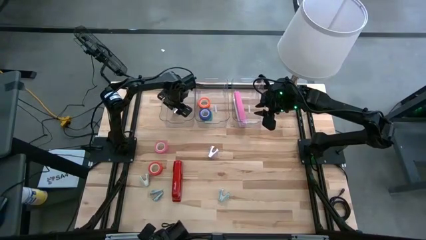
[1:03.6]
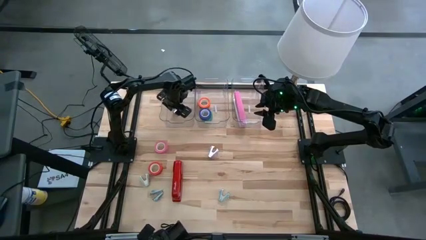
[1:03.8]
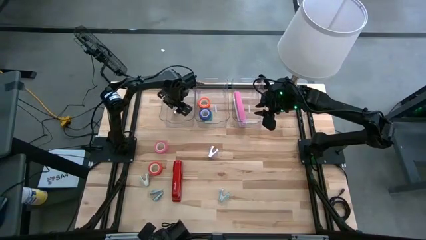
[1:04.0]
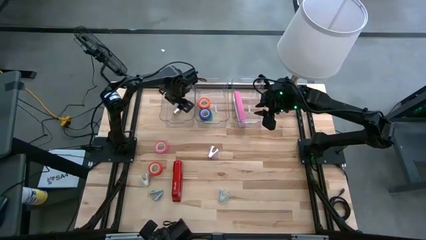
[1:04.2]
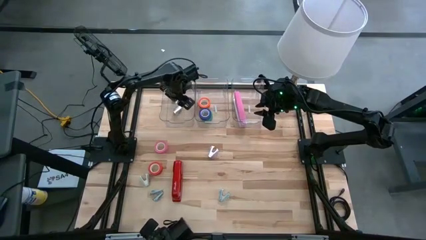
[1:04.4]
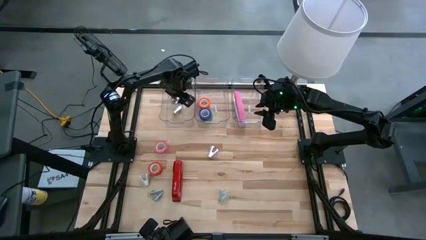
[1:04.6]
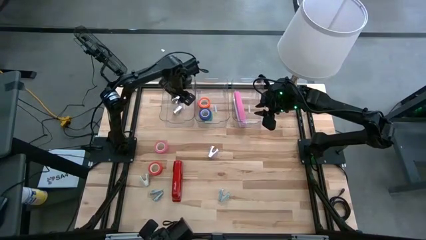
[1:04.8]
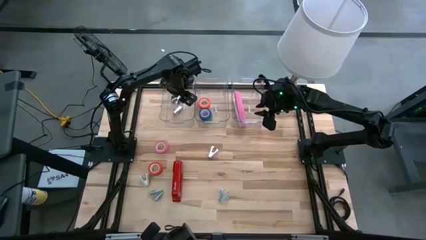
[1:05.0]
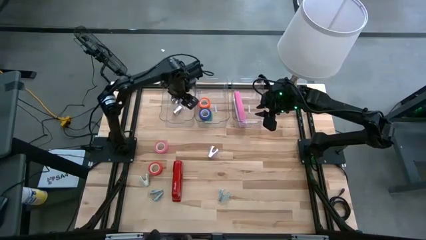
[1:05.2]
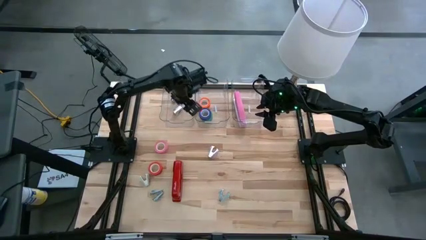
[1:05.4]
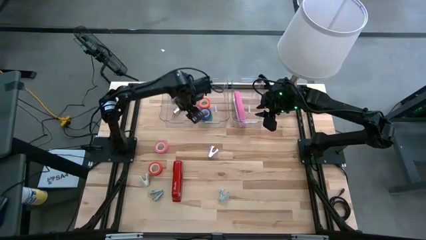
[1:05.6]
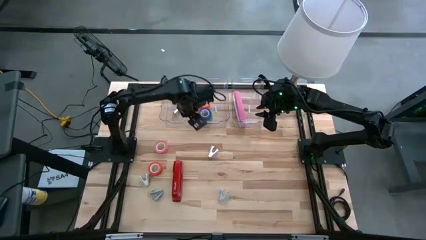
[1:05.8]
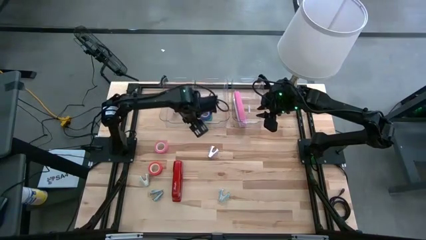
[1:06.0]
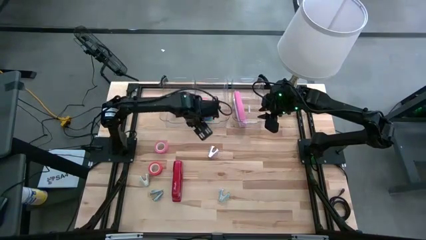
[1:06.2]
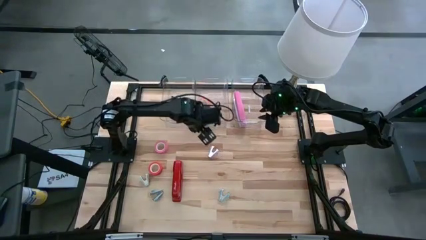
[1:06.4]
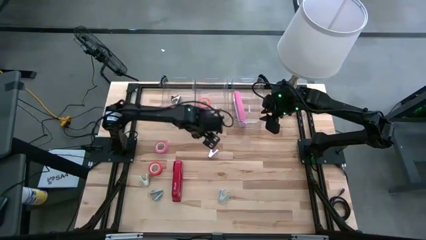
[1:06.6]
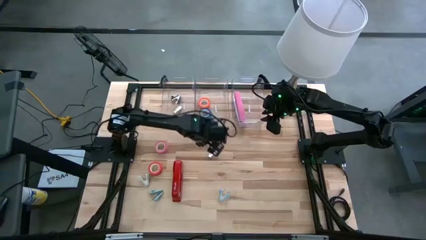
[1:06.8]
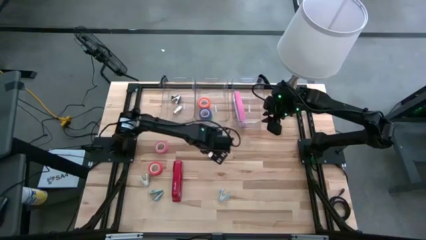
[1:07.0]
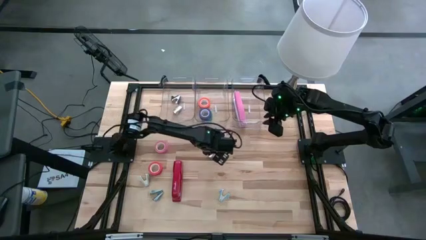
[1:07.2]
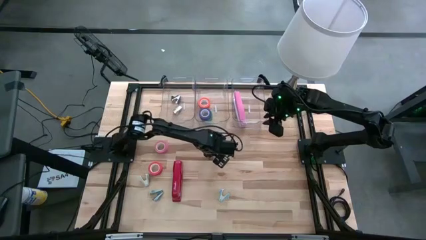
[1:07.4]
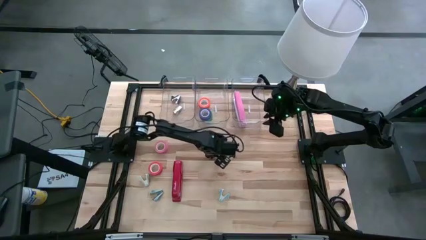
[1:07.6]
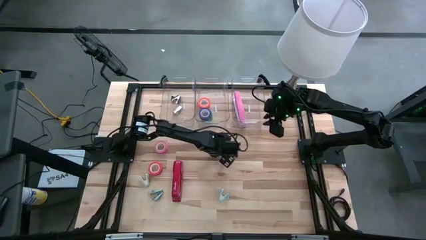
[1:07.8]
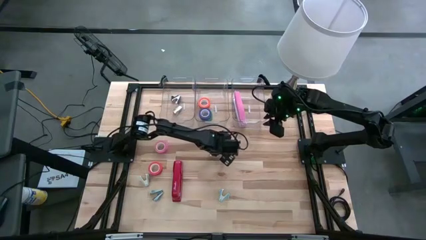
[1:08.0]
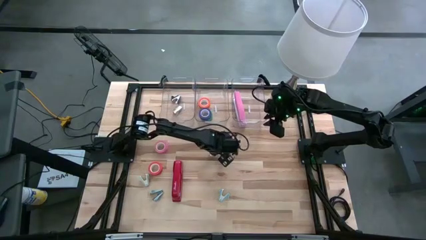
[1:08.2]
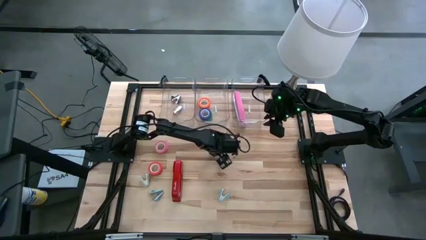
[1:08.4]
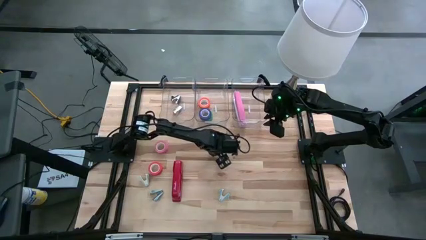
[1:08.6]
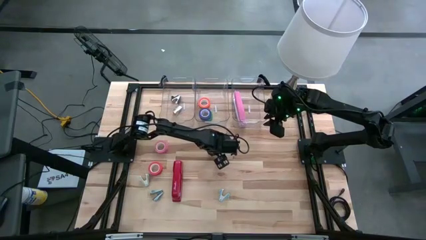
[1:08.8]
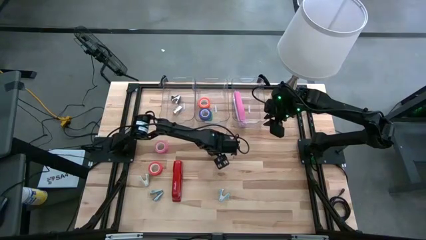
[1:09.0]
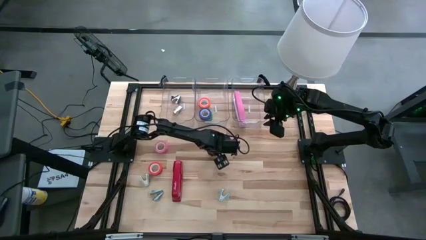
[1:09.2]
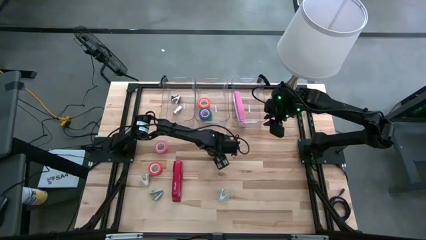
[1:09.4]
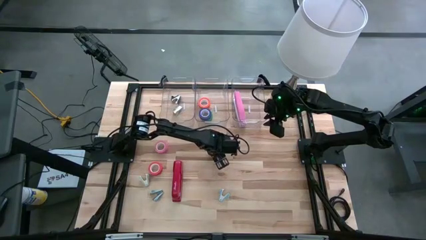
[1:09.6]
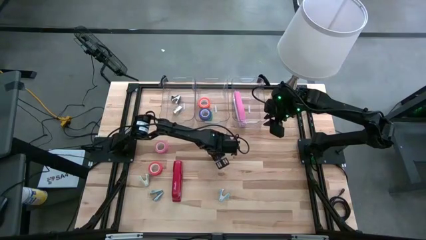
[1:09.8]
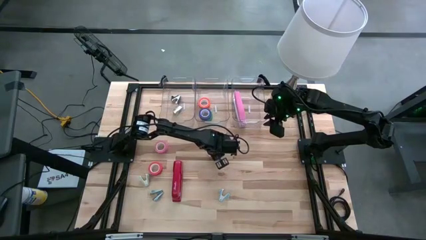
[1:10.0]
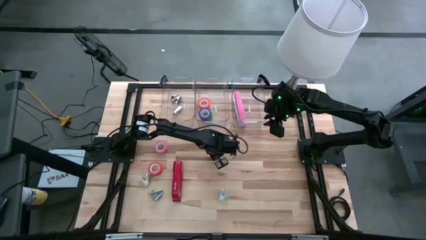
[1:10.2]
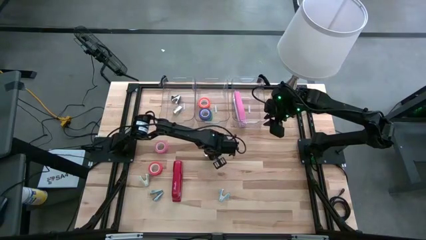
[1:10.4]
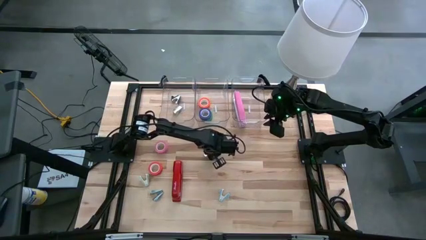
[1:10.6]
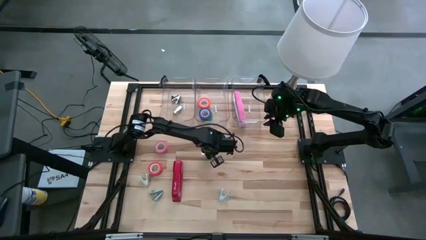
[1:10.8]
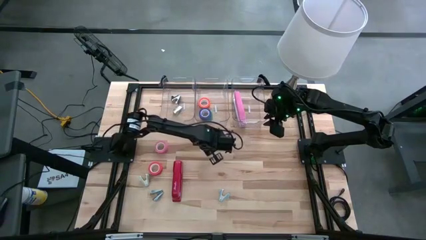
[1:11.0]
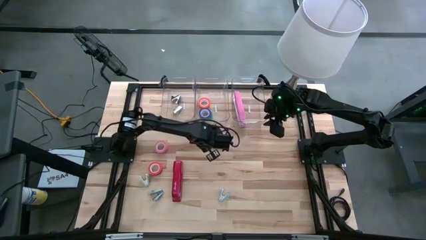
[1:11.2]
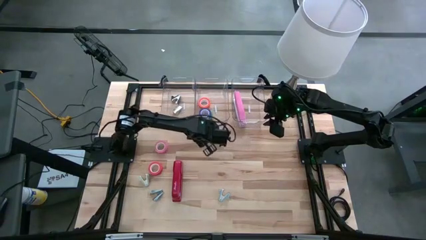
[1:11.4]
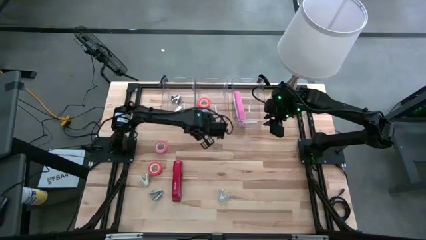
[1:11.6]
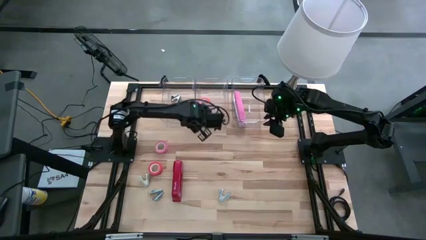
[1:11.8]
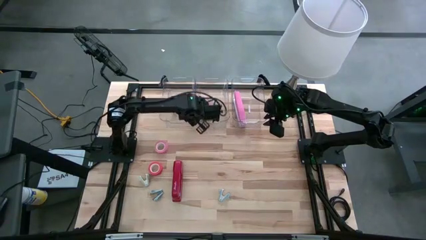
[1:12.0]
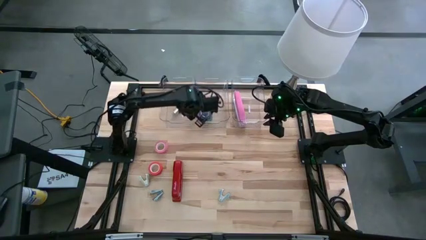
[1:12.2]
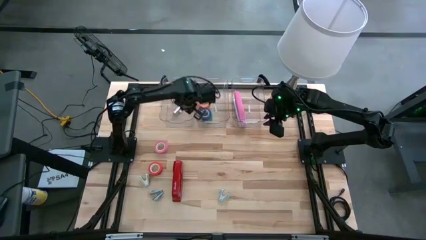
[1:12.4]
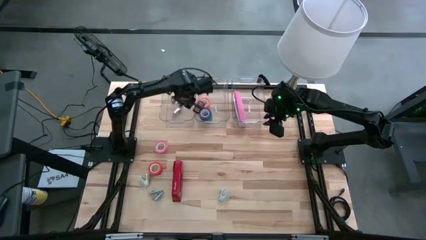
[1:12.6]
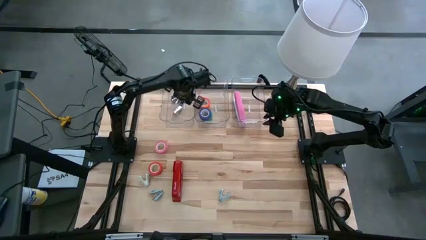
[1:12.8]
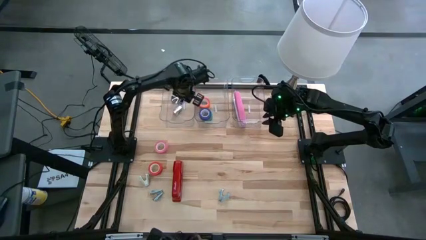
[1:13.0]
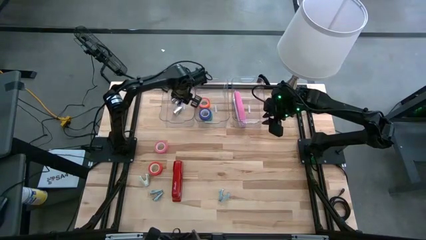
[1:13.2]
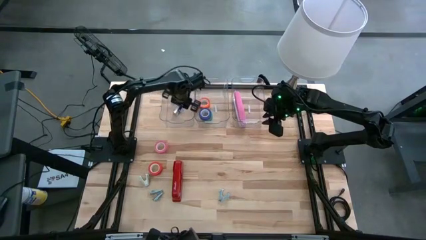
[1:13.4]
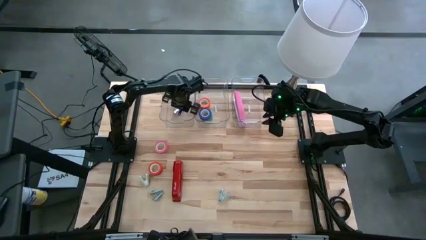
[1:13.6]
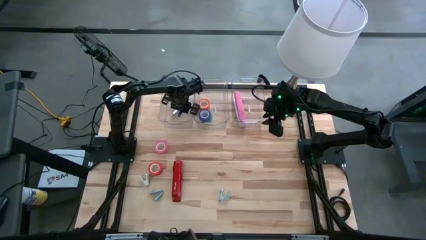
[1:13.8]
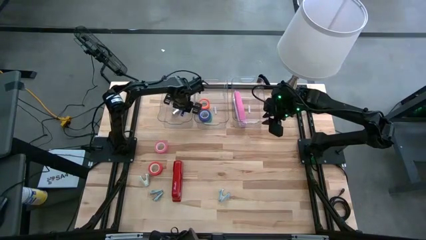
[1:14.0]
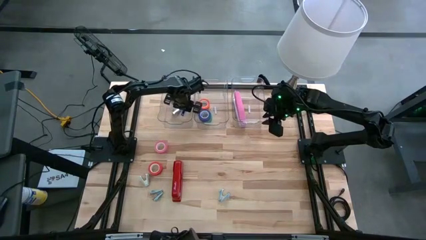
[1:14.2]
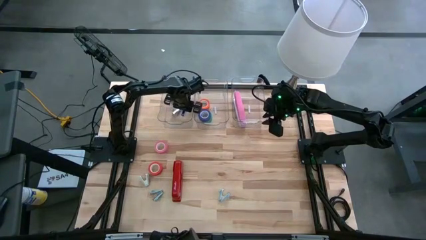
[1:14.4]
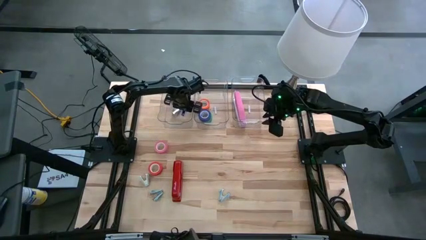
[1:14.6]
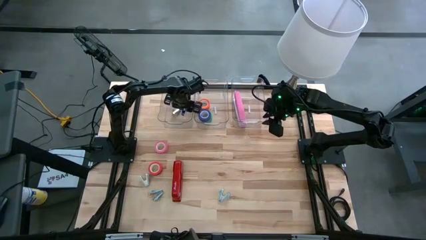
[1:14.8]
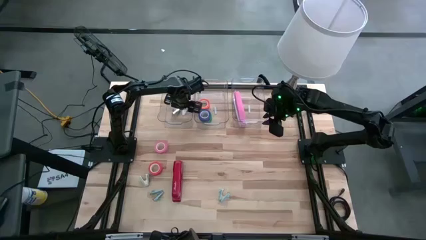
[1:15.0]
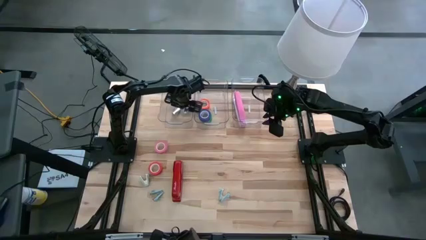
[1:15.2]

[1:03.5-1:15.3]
Task: Pick and place Stapler, Stapler remover, tape
Put the violet staple remover into the left transparent bin
